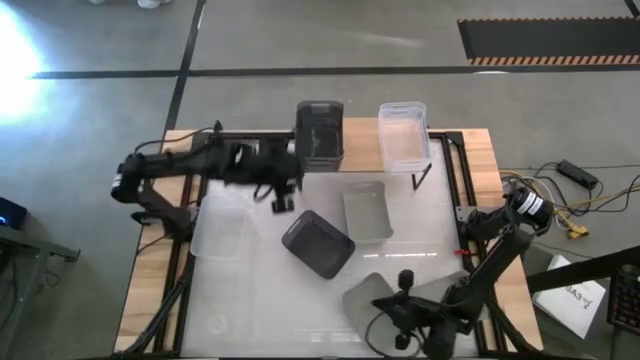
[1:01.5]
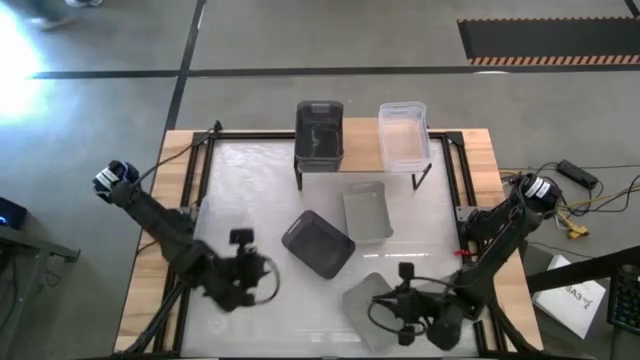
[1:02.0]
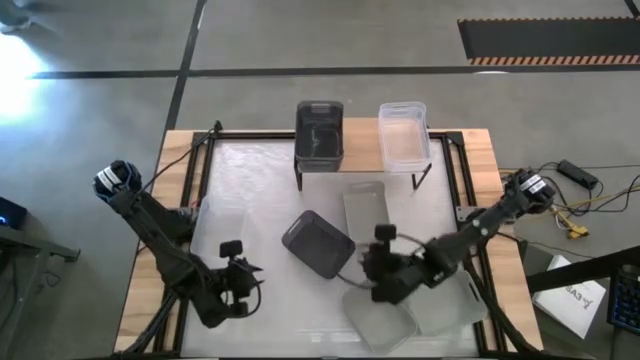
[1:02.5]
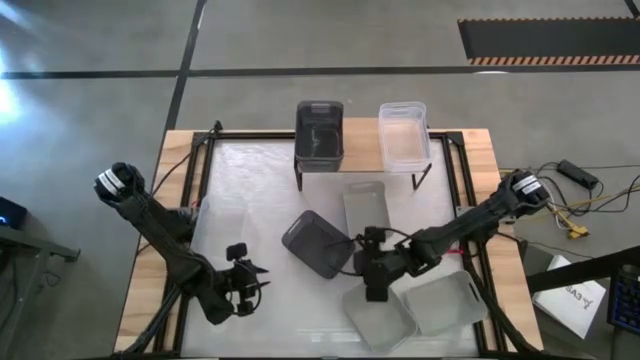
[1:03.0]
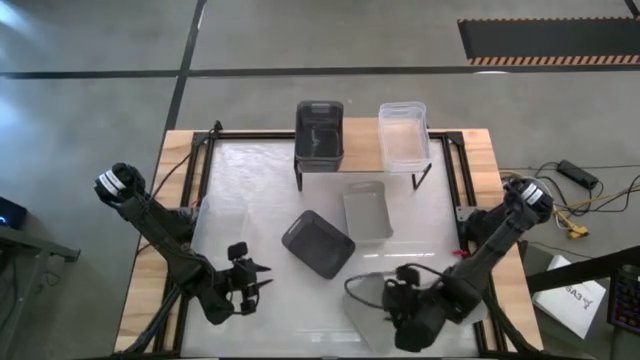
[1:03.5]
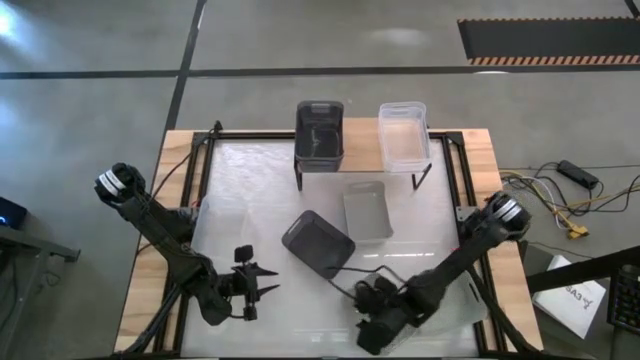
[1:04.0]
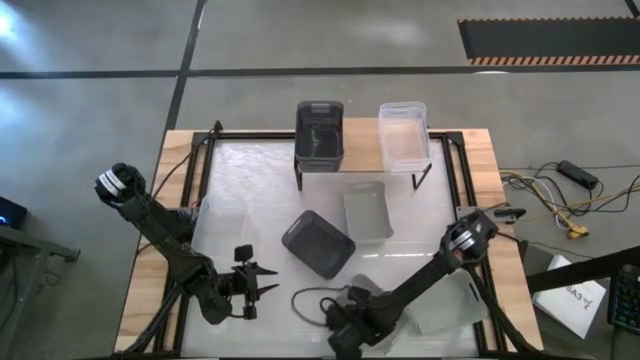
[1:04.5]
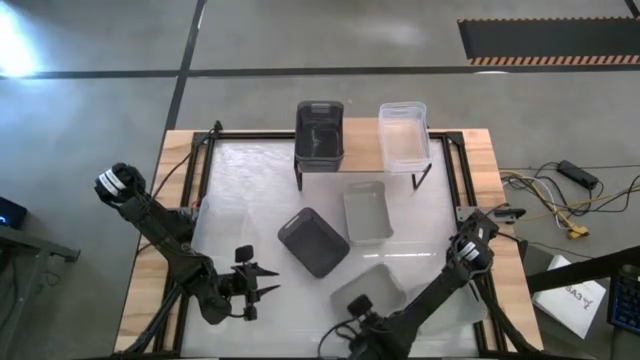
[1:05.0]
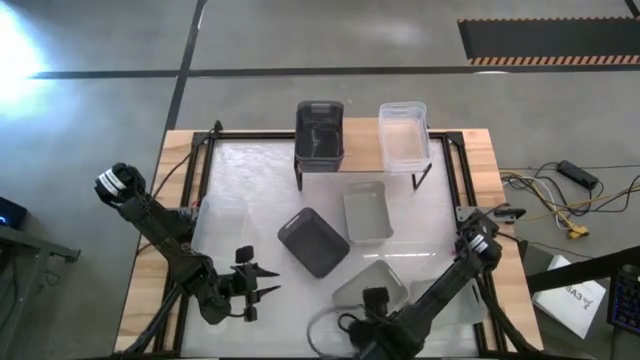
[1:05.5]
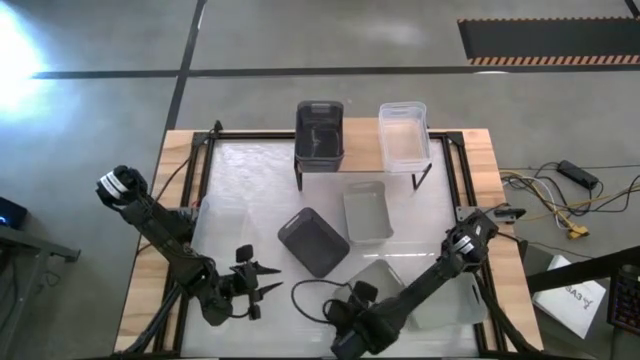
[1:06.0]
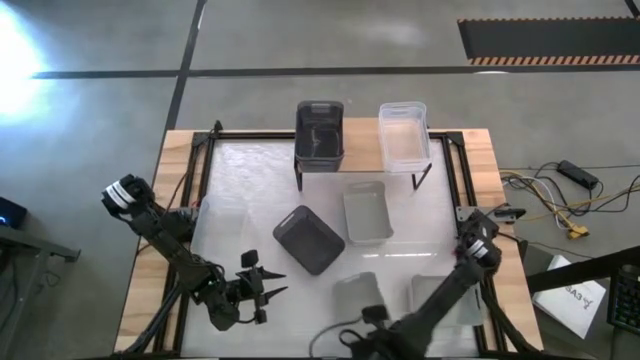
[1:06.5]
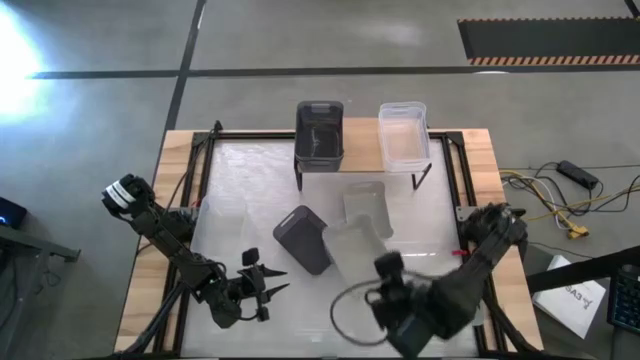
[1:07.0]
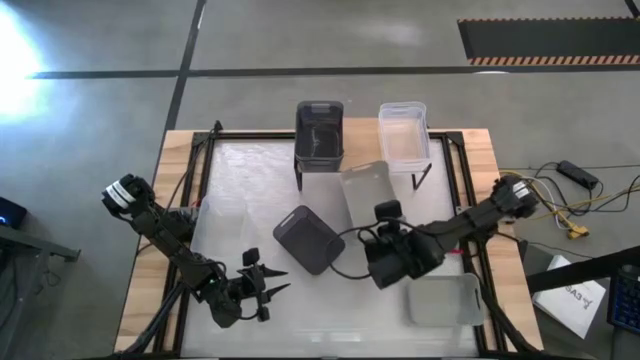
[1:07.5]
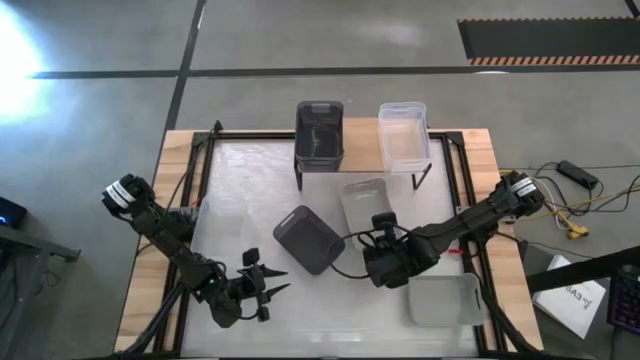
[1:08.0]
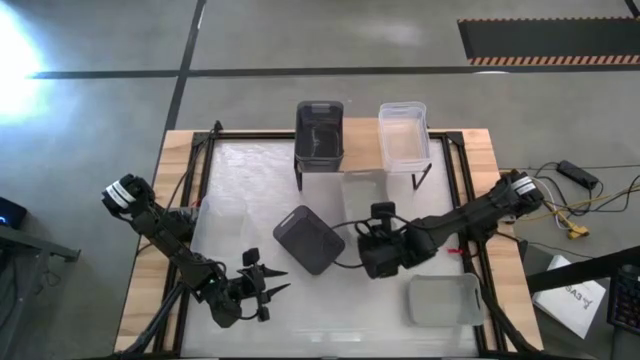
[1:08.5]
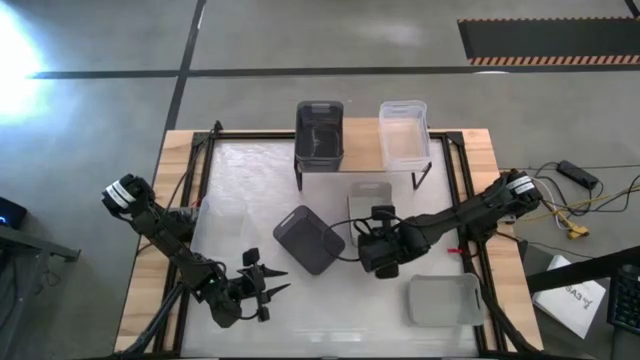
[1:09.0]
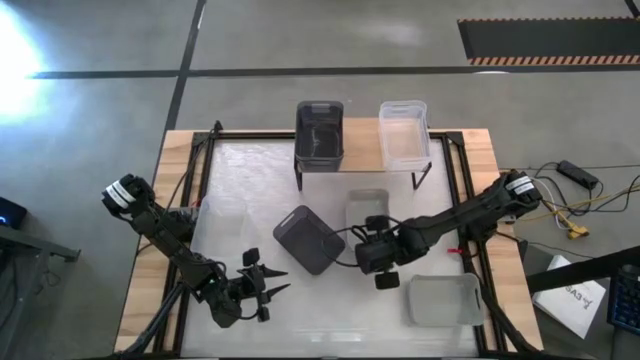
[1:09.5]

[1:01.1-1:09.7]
Task: Stack baskets on shelf by color
Stack the bottom left gray bin on top of the top gray bin

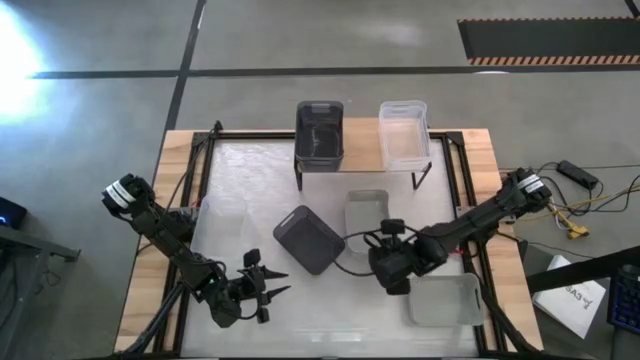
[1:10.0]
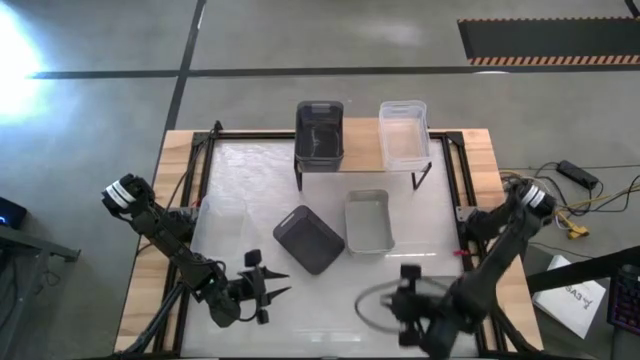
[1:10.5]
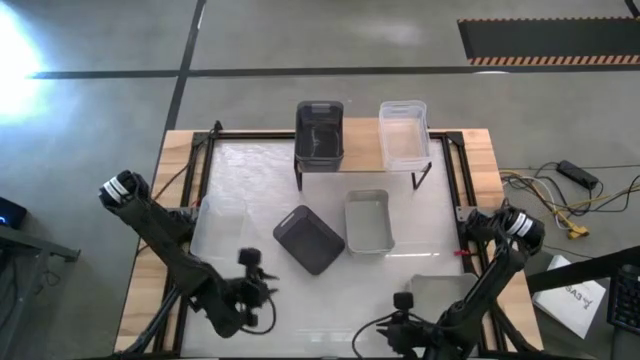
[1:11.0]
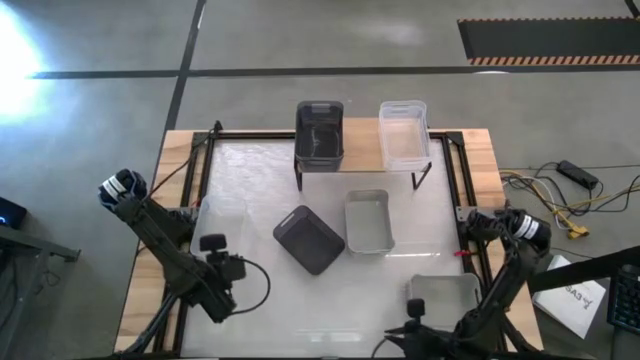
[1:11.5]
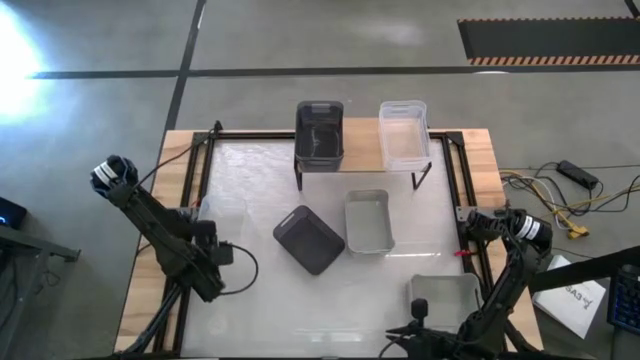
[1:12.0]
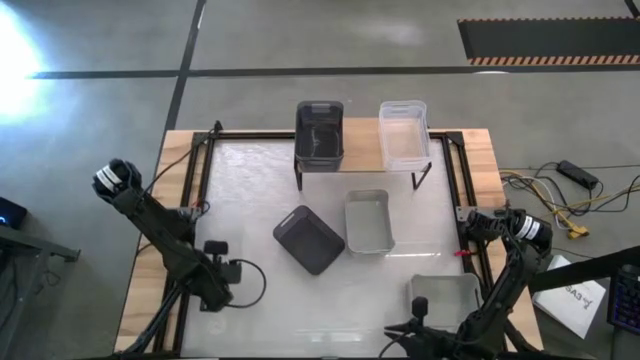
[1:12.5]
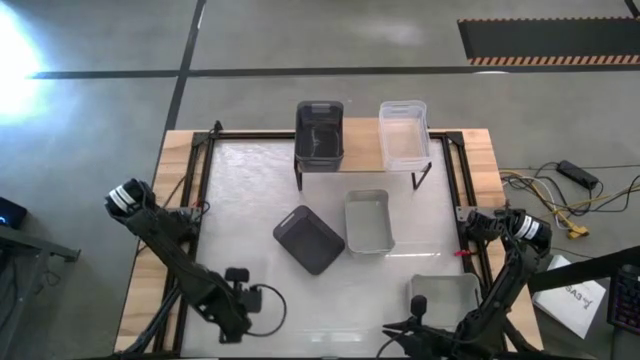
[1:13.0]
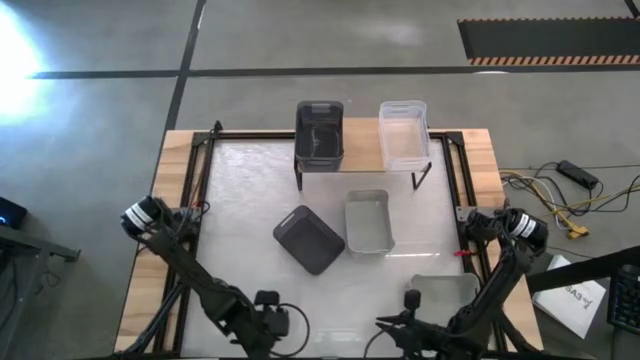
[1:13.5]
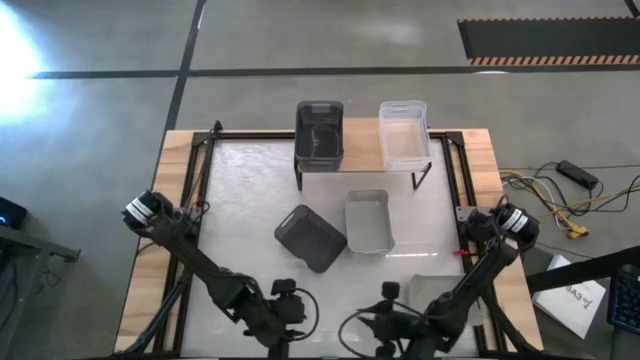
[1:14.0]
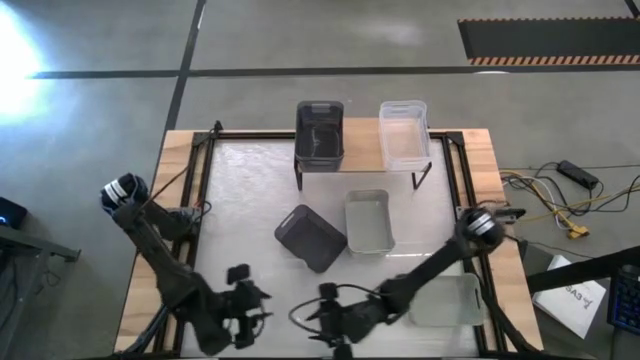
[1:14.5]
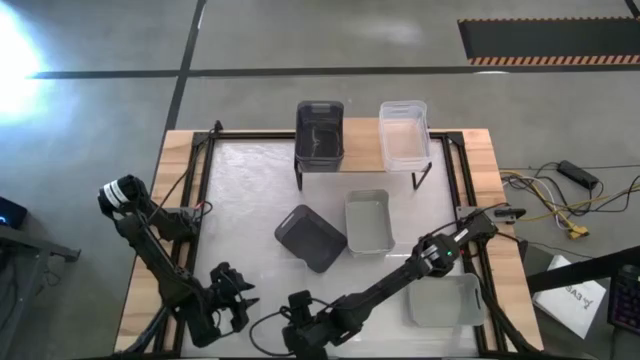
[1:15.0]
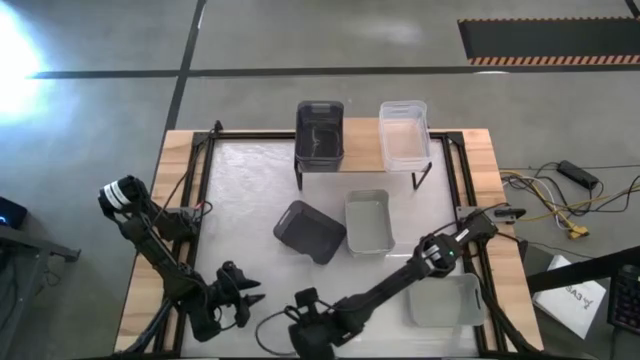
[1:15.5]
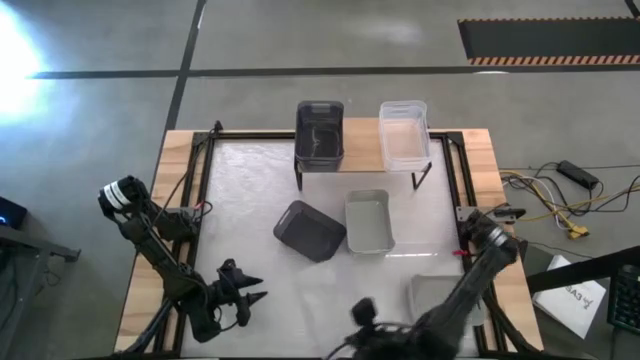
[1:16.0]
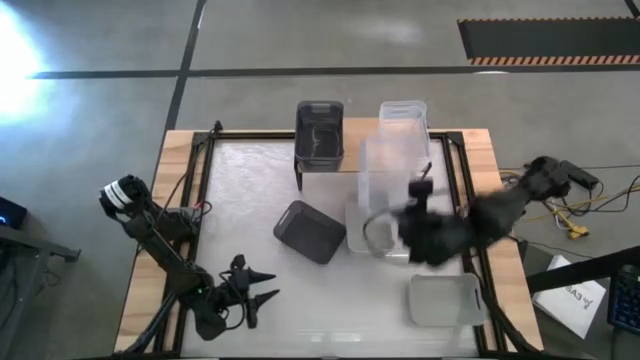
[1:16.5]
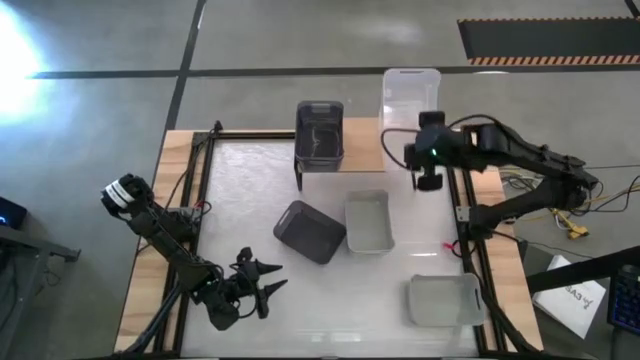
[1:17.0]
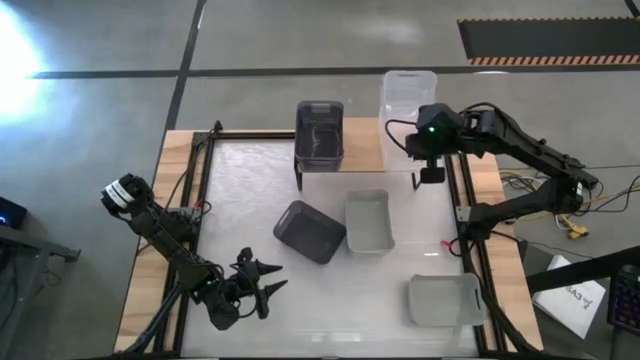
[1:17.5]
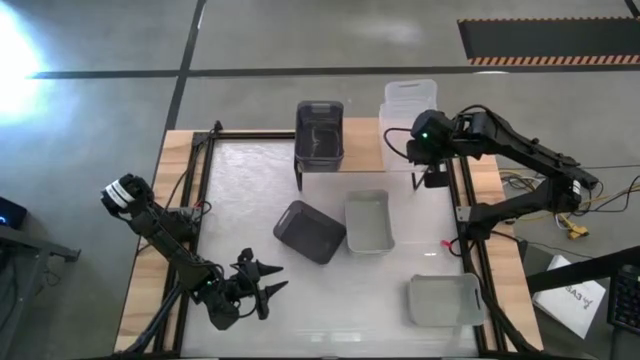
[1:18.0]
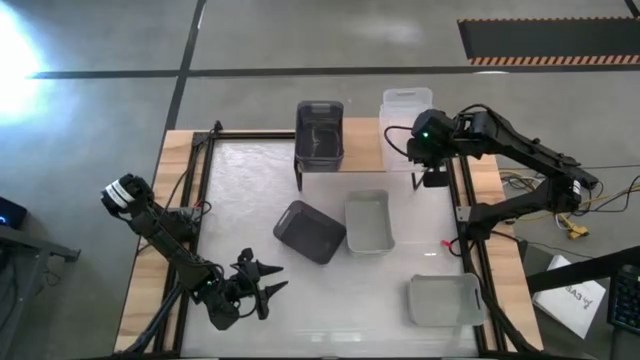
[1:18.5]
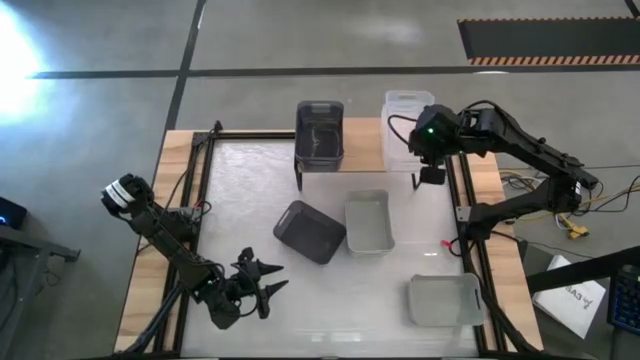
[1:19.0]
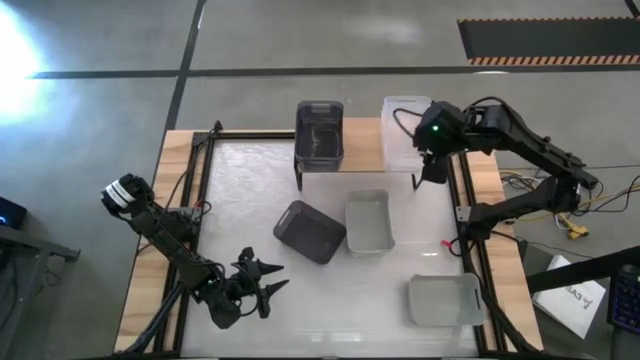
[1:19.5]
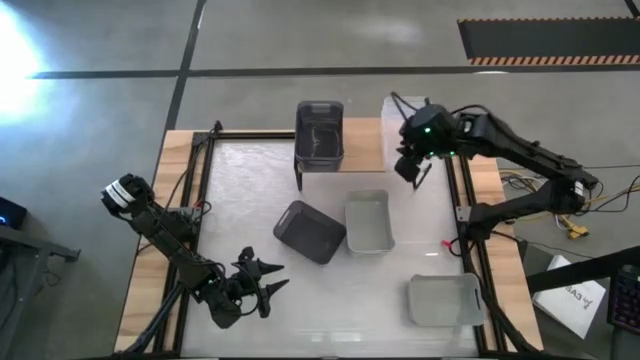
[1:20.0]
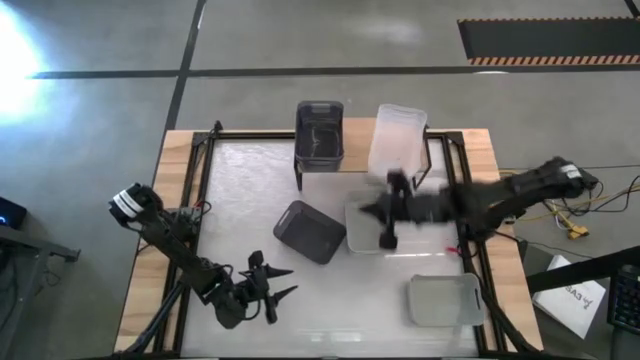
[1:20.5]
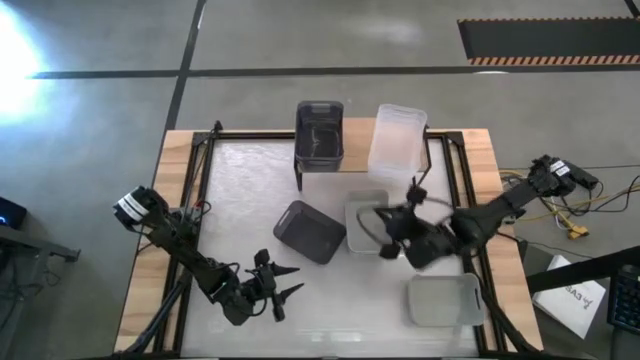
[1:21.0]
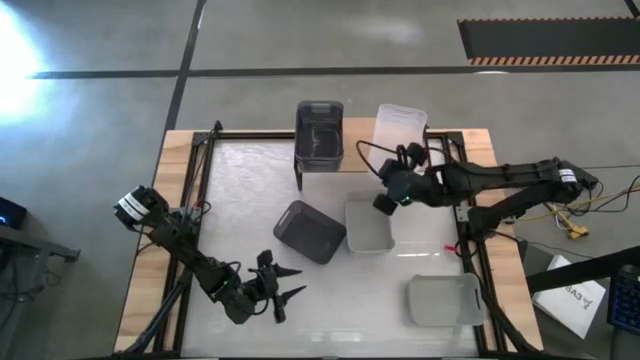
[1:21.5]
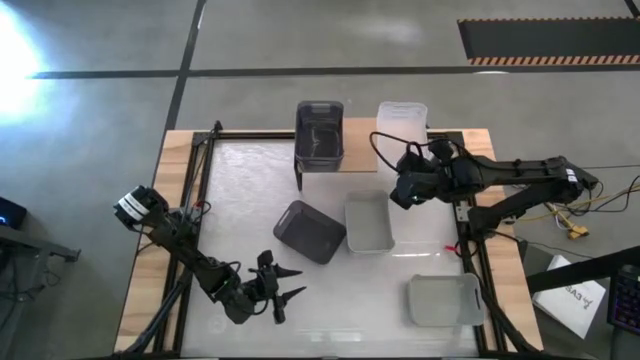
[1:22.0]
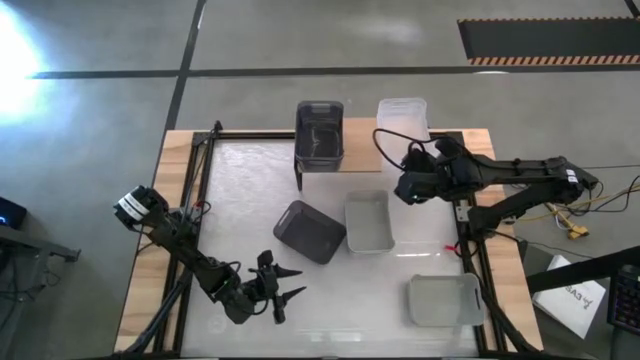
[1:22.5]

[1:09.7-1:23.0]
Stack the transparent bin on top of the transparent bins on the shelf
